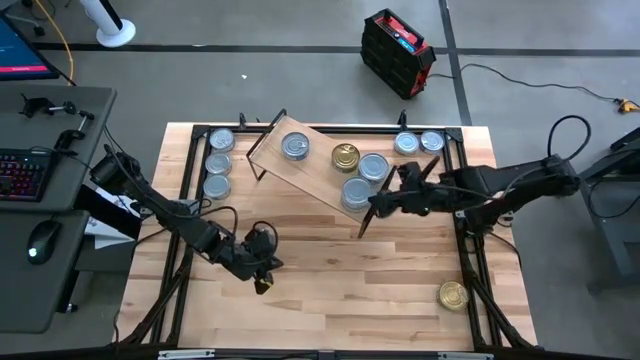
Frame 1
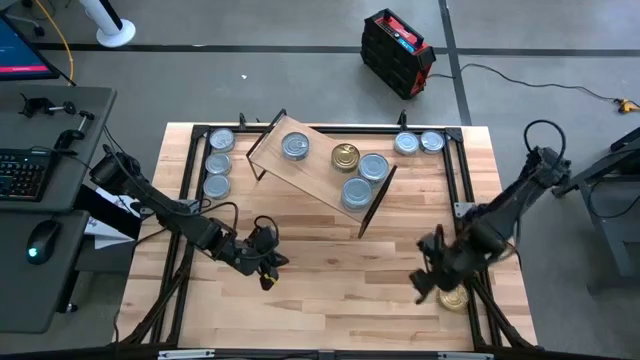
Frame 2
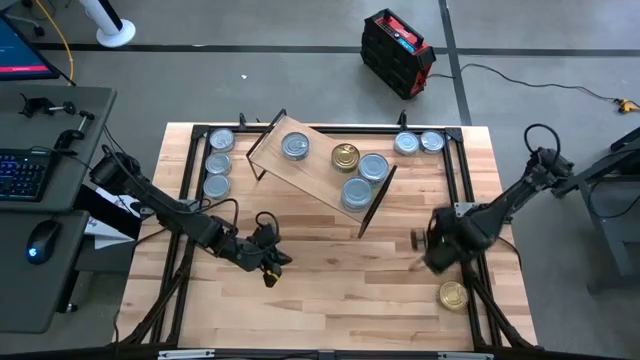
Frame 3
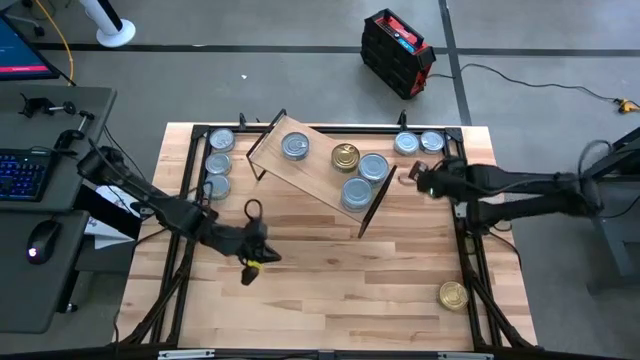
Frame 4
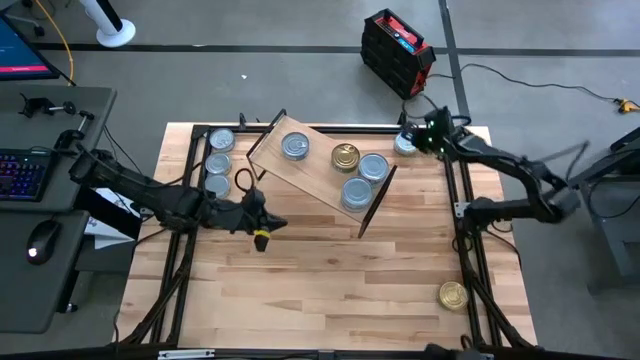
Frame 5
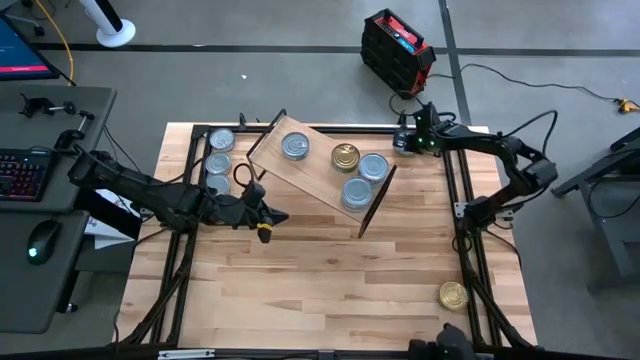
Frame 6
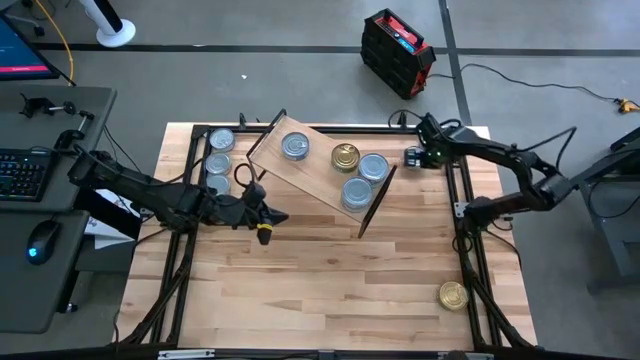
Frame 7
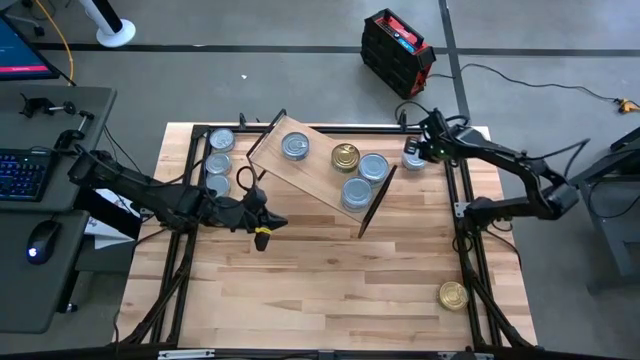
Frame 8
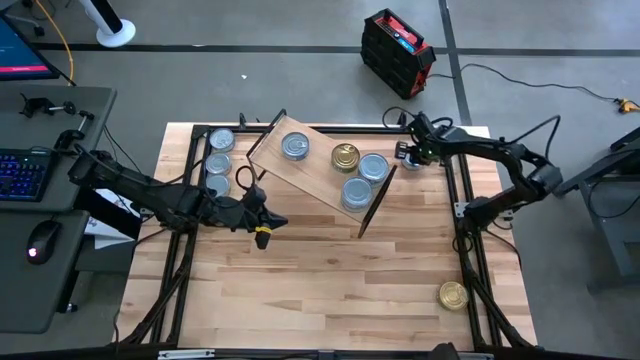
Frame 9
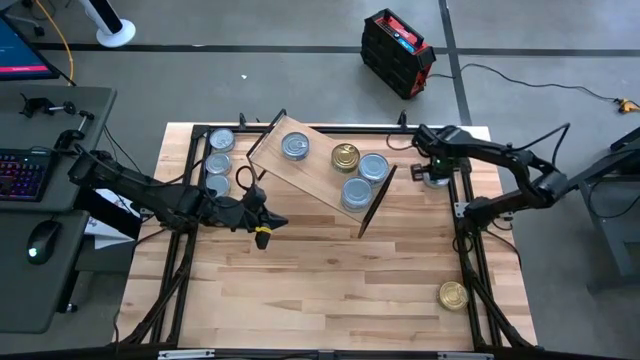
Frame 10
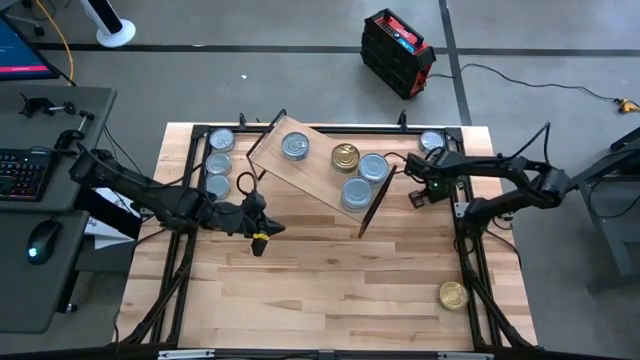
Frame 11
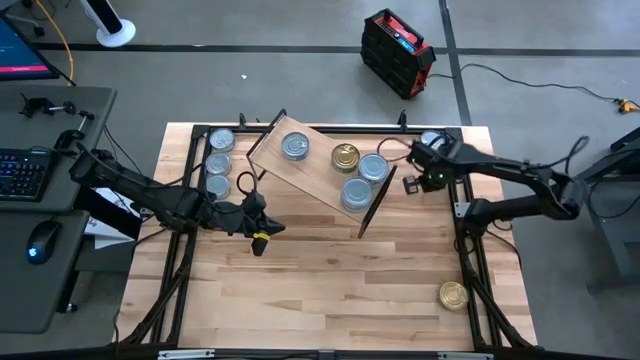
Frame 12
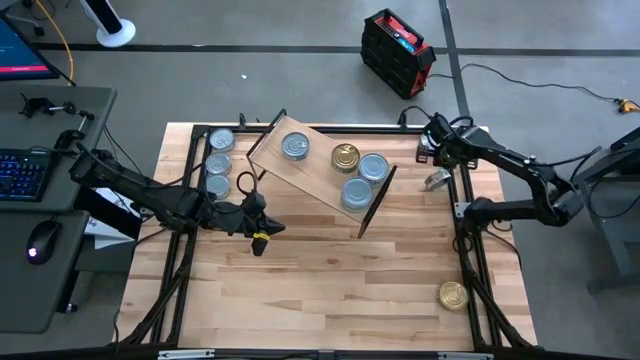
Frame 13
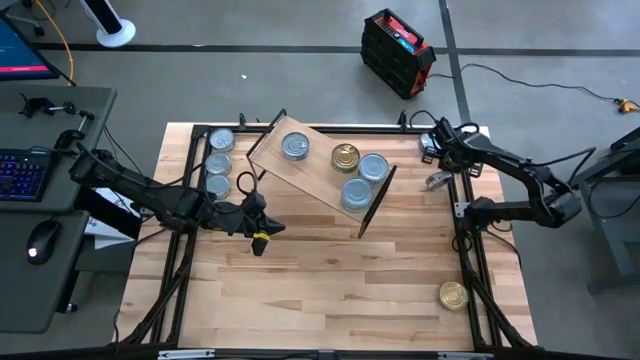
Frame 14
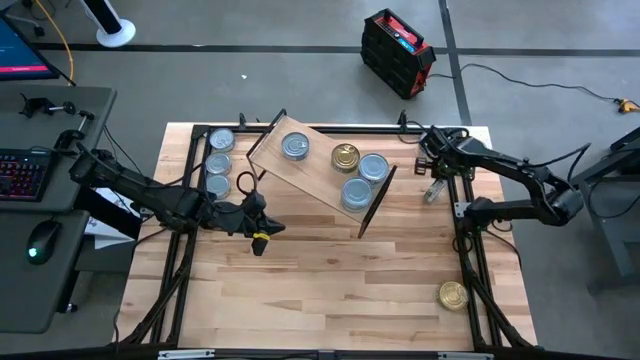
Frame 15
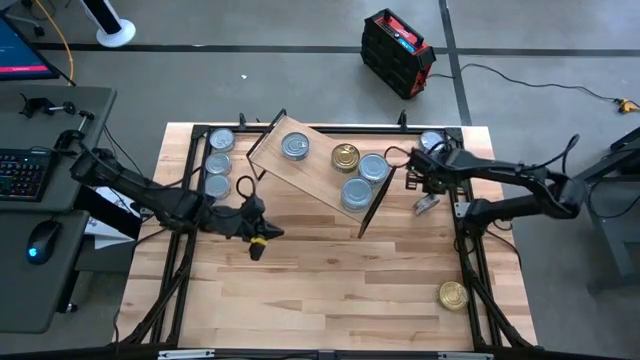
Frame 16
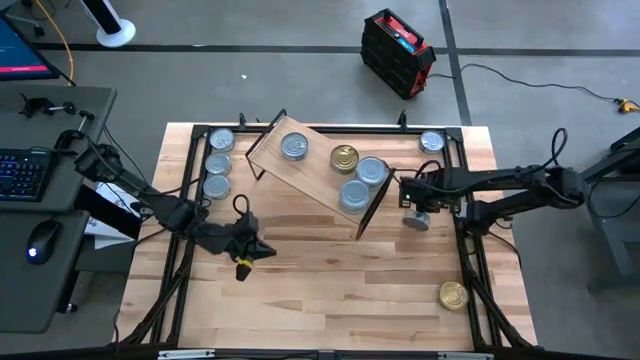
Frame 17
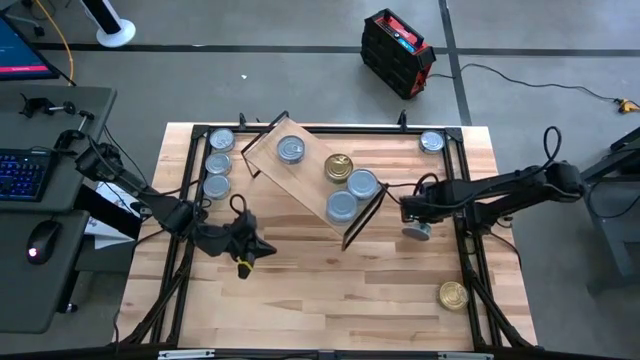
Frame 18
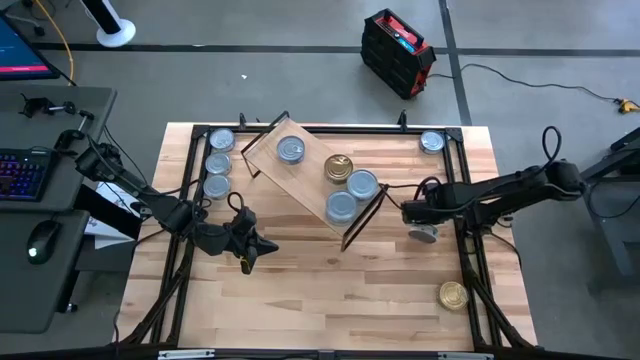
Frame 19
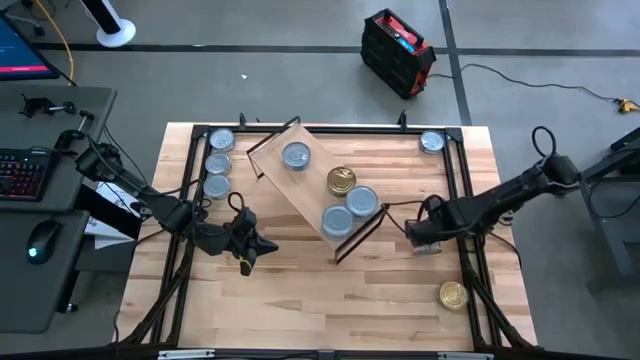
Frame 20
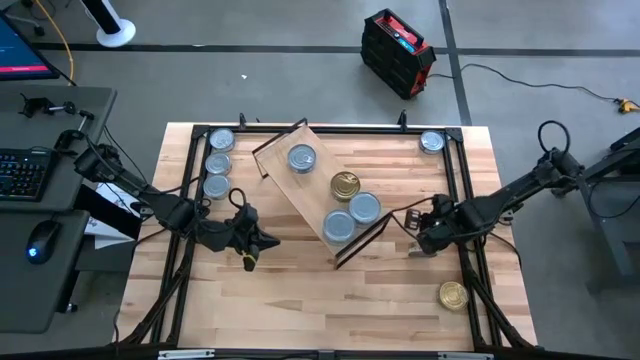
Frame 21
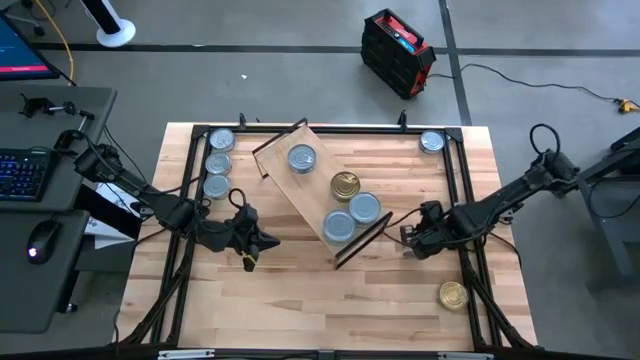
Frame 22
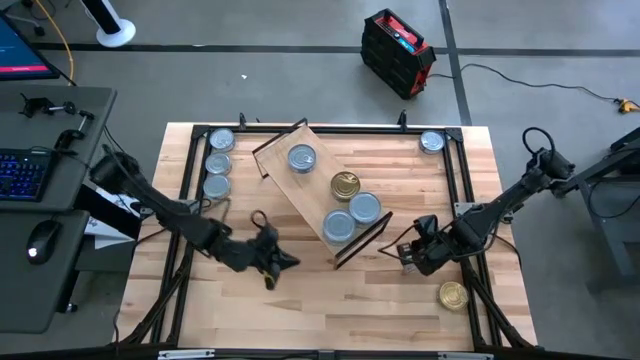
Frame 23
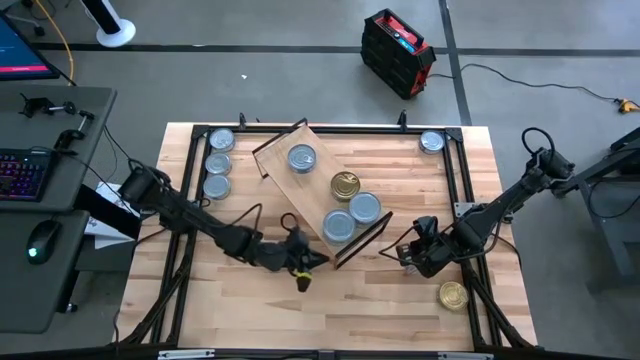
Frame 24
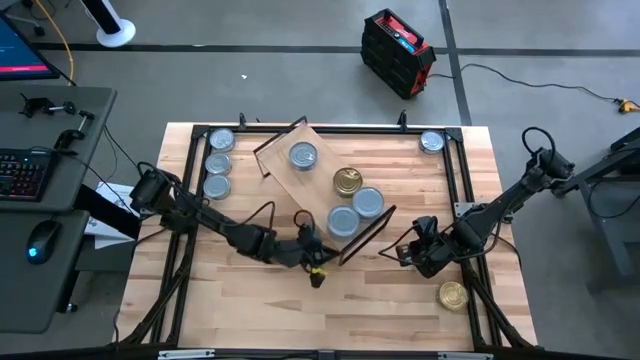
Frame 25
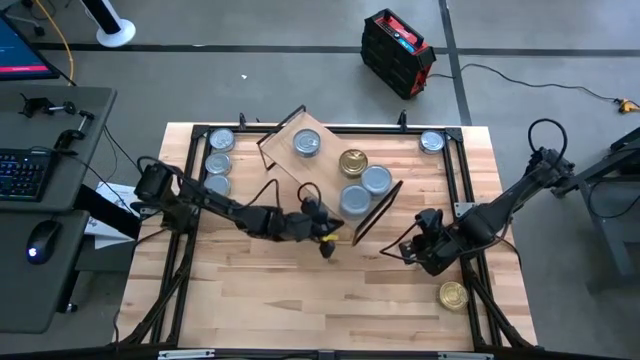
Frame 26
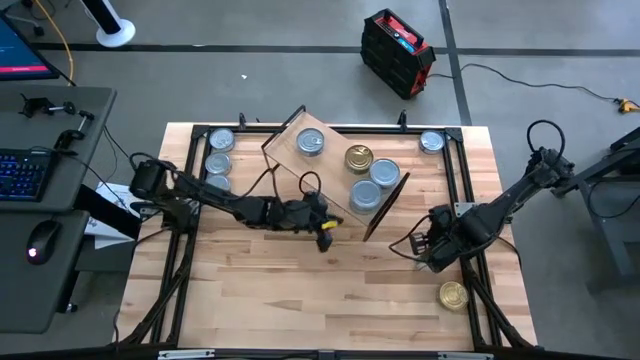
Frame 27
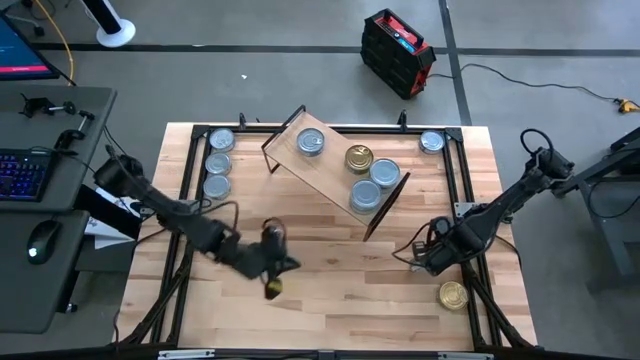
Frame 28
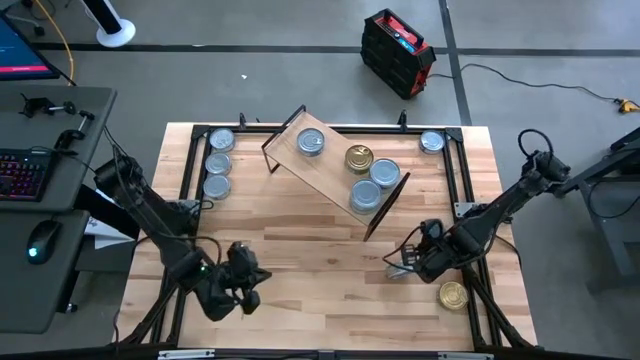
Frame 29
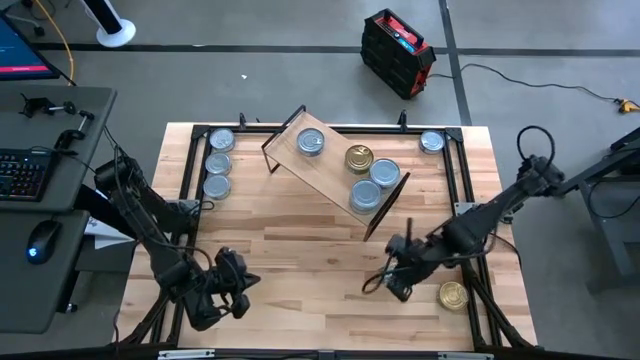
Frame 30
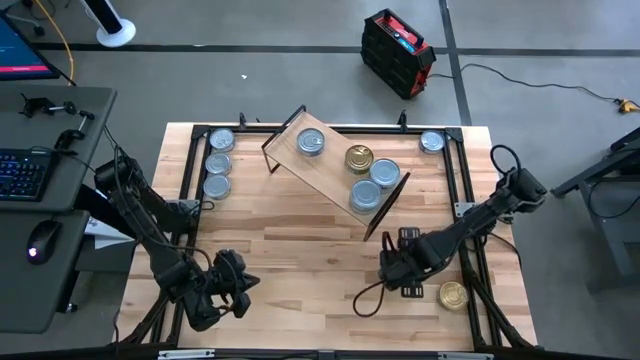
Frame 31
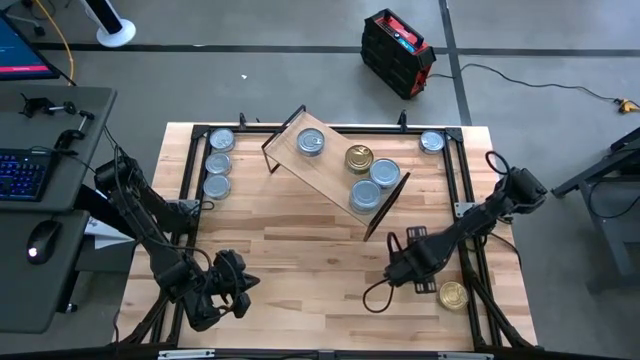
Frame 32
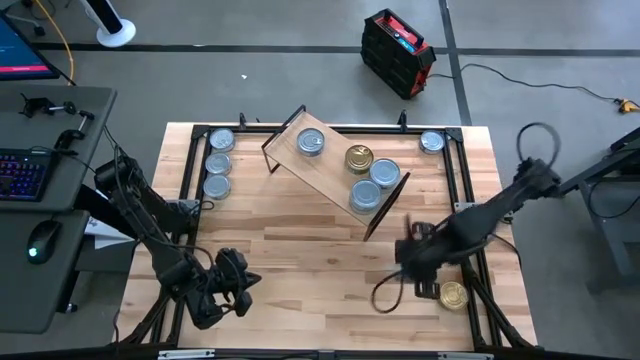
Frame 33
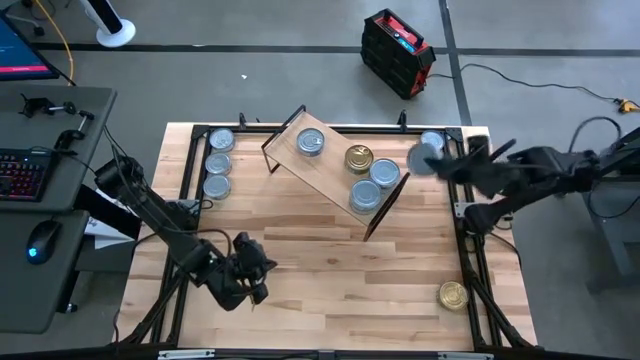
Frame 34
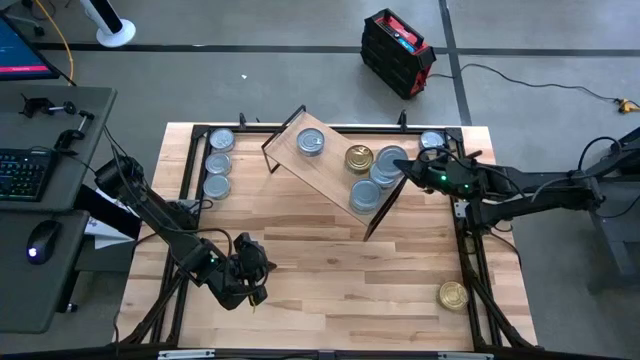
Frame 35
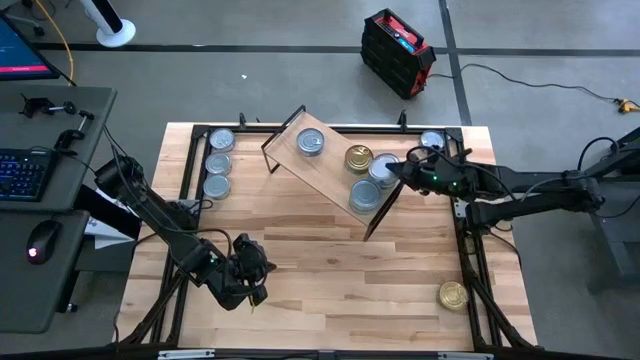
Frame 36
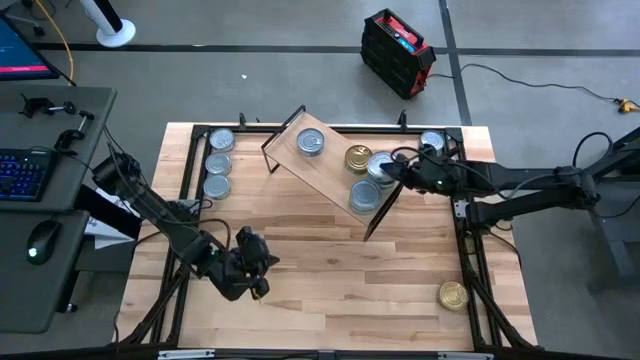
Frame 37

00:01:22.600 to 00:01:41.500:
Task: Stack canned seafood by type on shelf
Stack the white-green tuna can on top of the other white-green tuna cans on the shelf

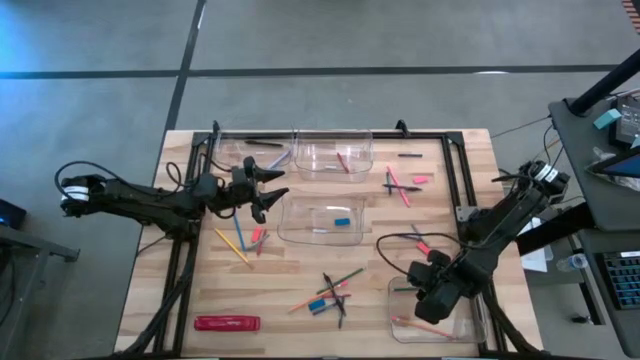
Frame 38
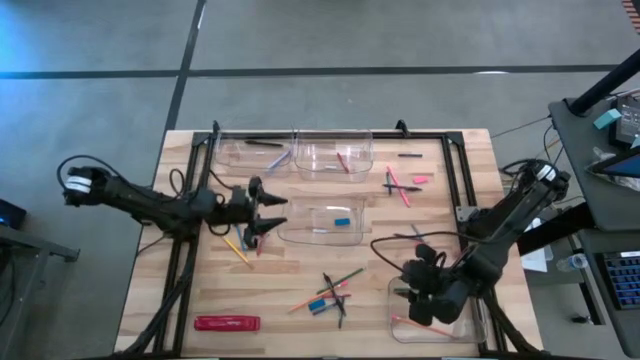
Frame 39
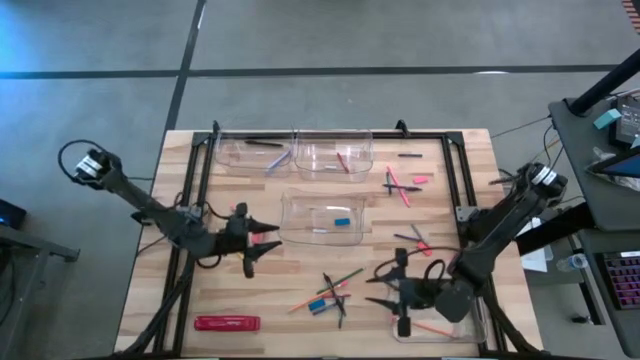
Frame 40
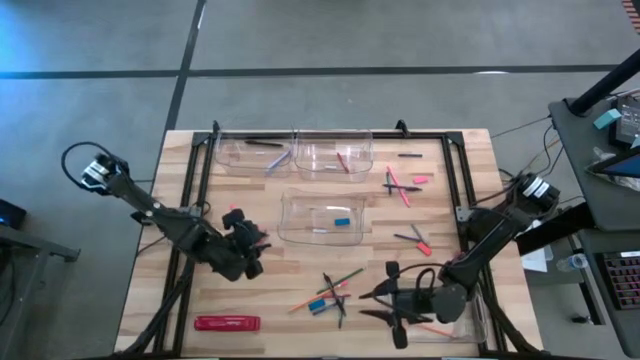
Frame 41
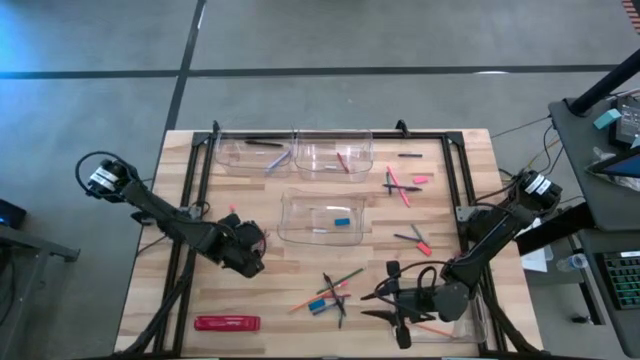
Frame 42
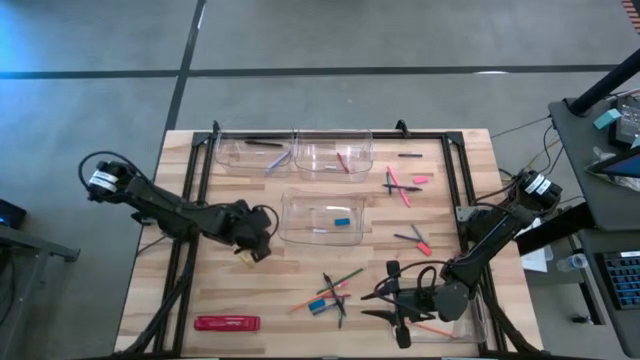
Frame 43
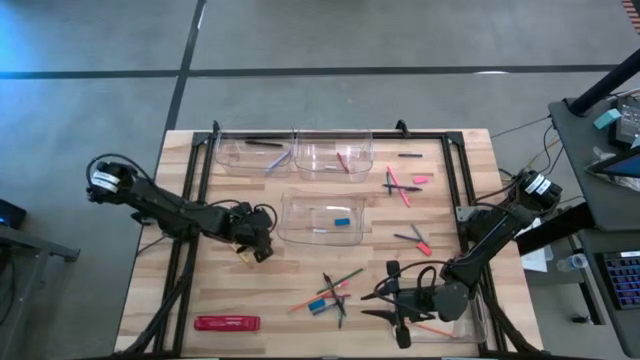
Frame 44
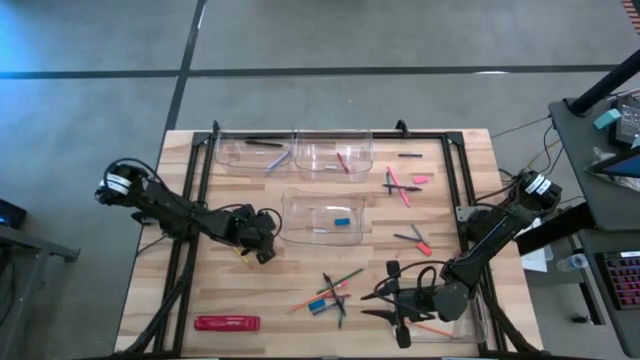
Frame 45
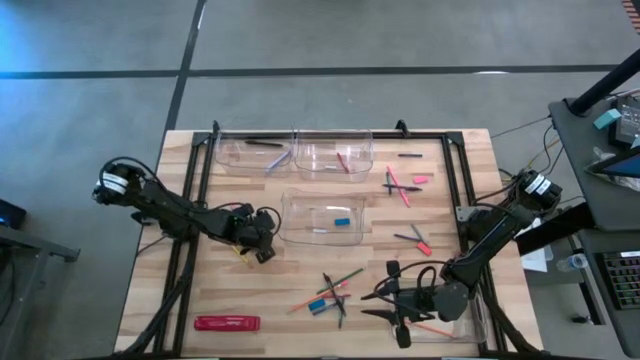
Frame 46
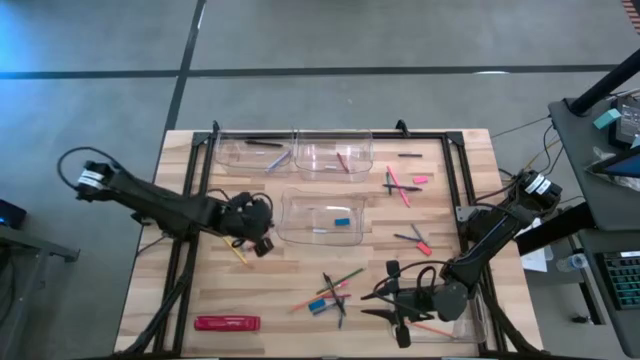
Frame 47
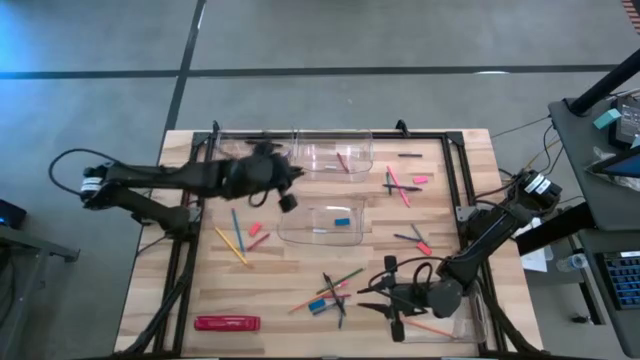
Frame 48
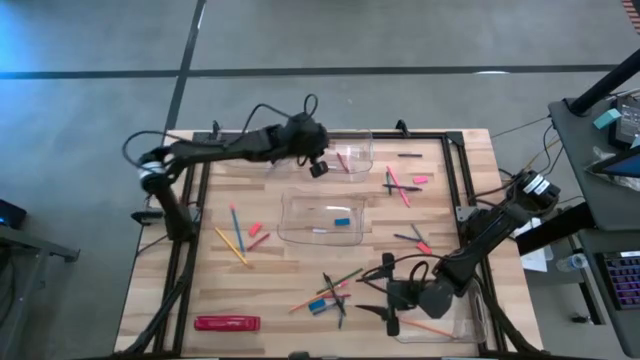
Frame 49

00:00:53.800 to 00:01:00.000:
Task: Sort crayons/erasers/pens/pencils in bins
Put the gray crayon into the top right transparent bin
